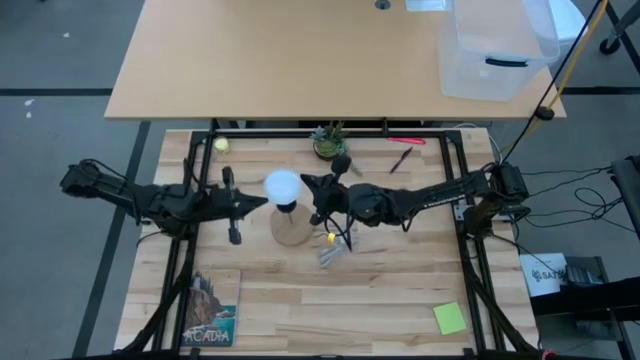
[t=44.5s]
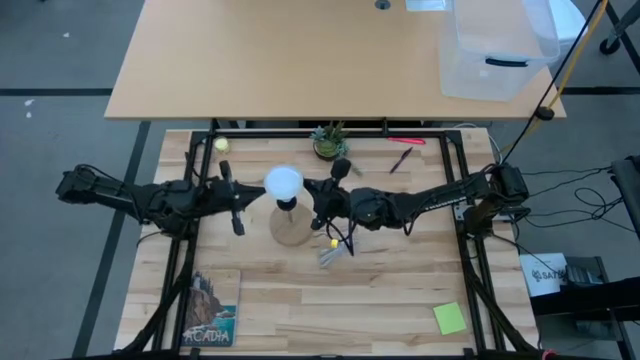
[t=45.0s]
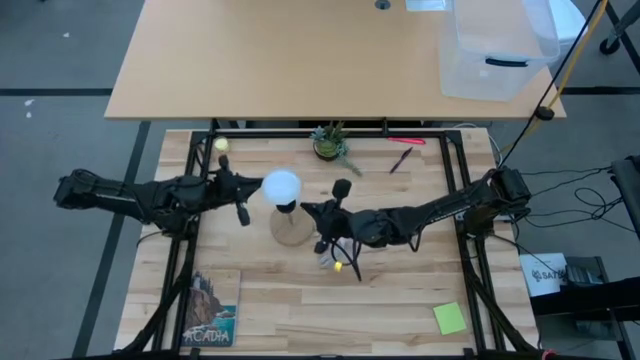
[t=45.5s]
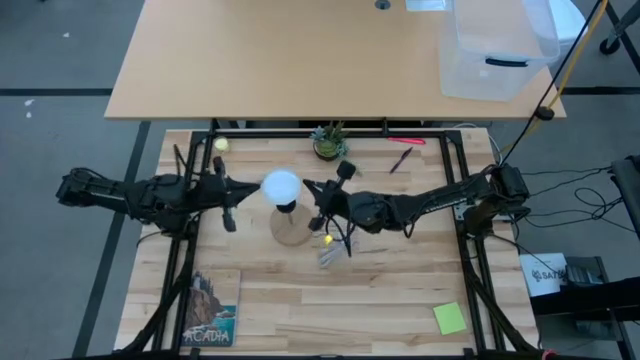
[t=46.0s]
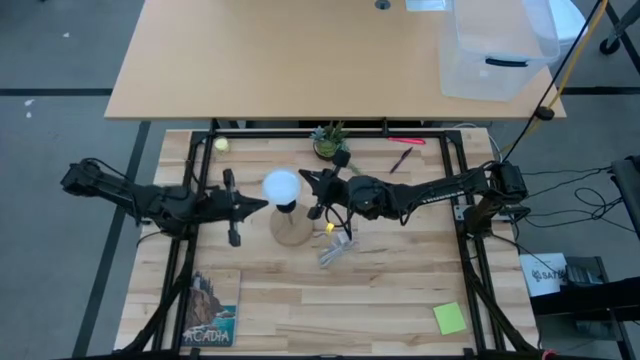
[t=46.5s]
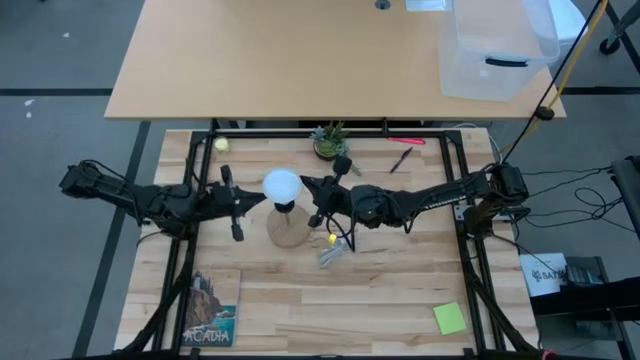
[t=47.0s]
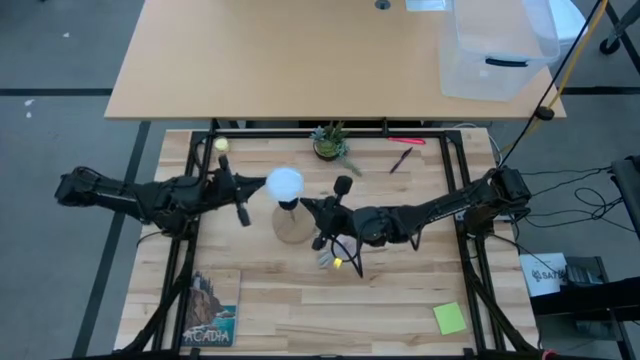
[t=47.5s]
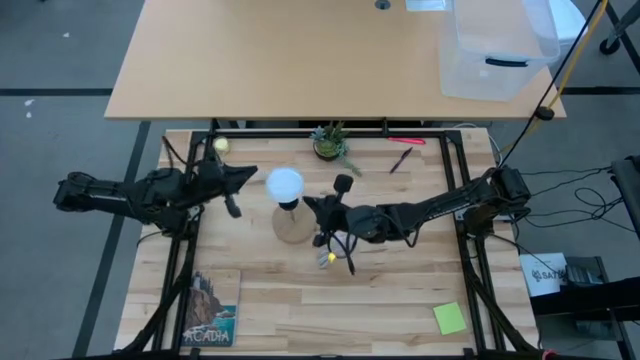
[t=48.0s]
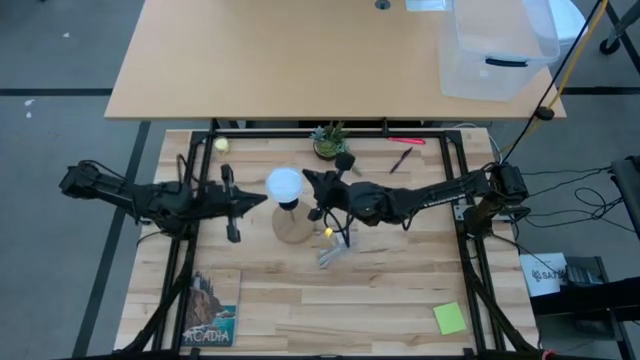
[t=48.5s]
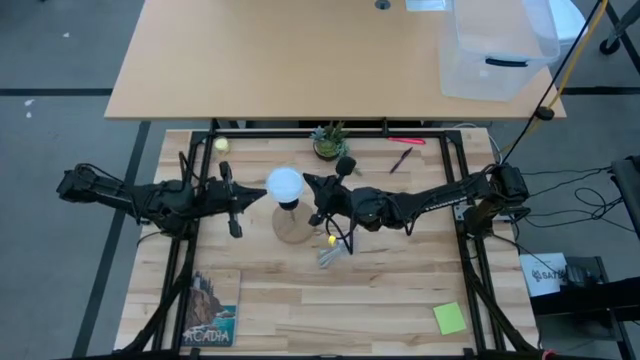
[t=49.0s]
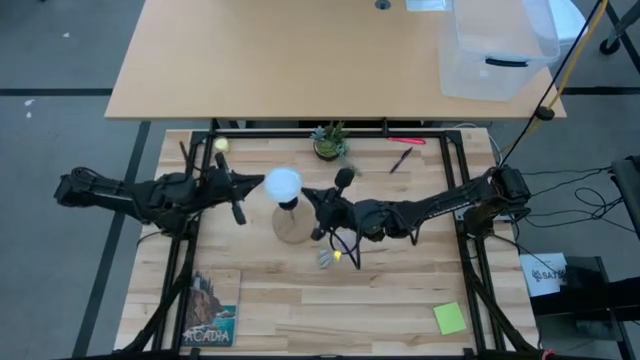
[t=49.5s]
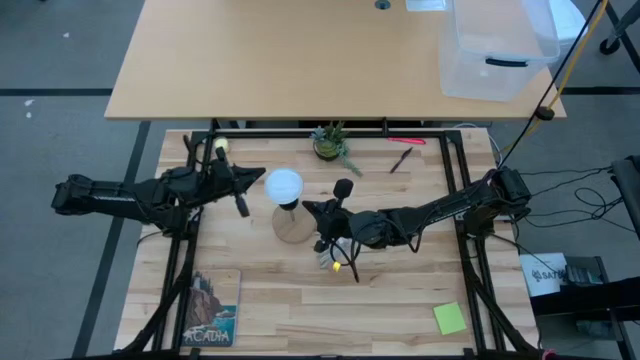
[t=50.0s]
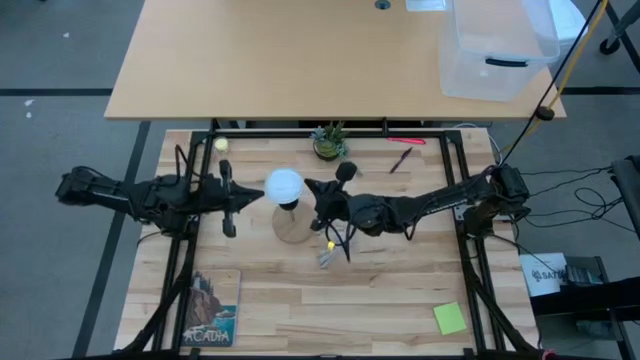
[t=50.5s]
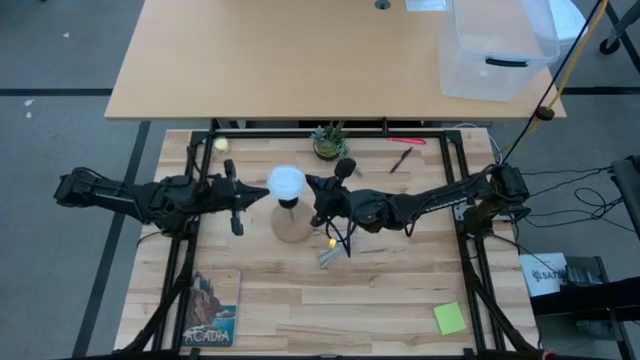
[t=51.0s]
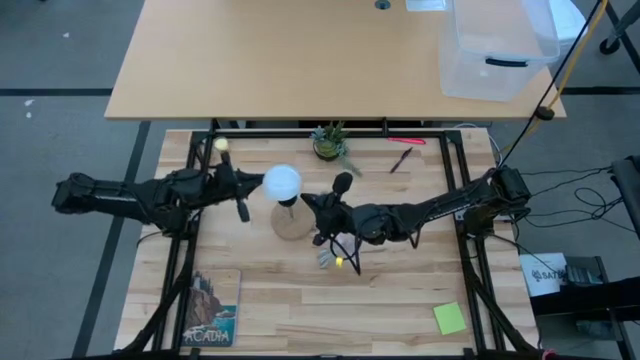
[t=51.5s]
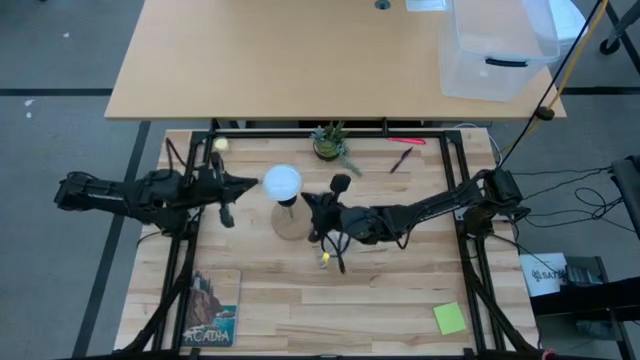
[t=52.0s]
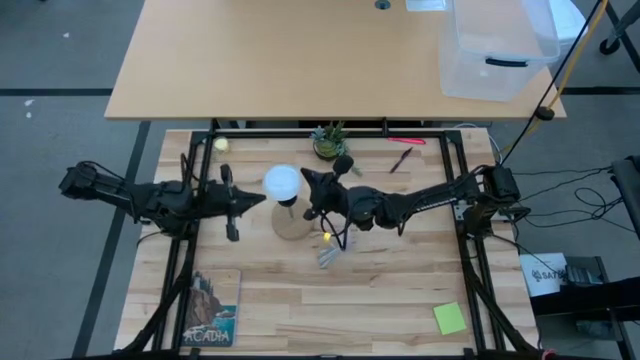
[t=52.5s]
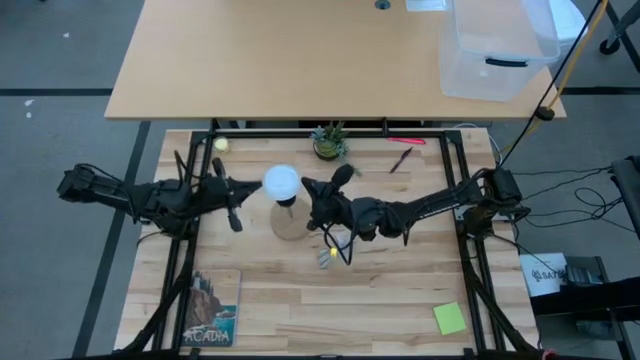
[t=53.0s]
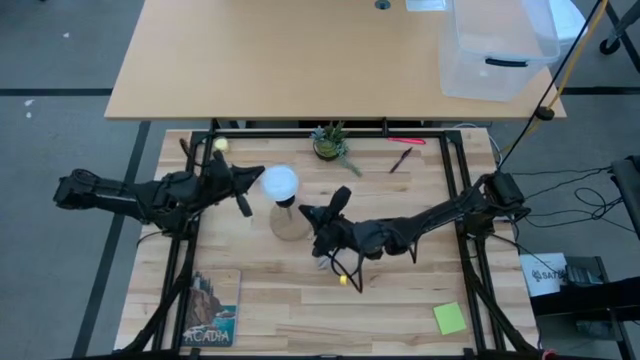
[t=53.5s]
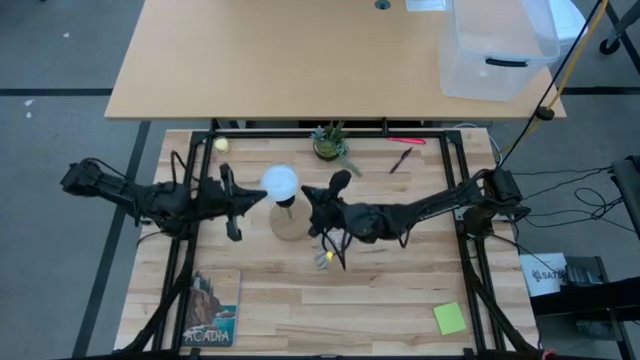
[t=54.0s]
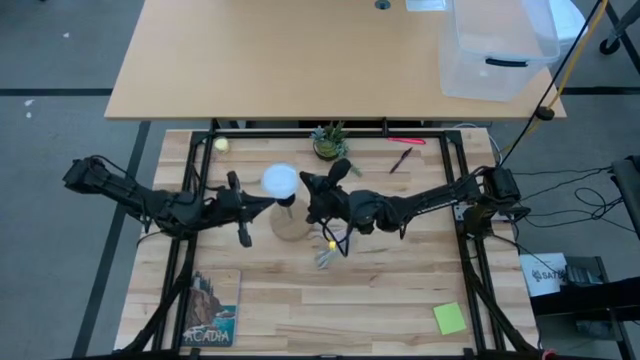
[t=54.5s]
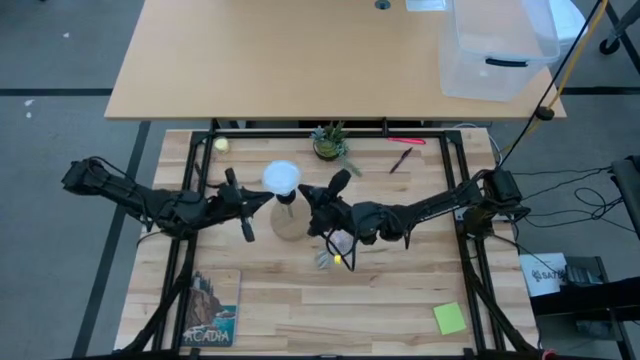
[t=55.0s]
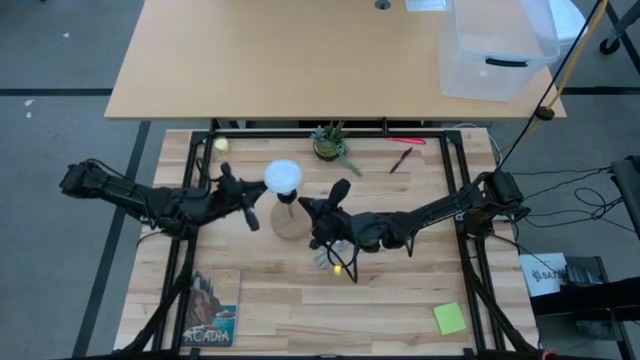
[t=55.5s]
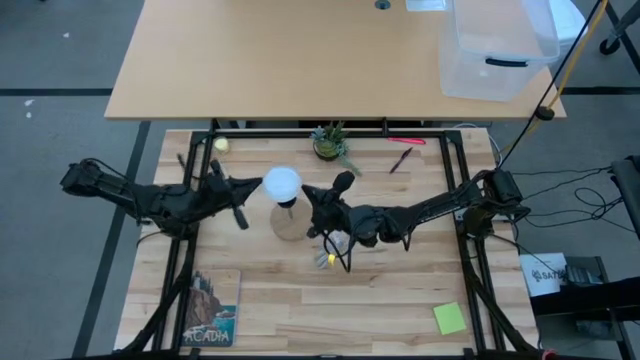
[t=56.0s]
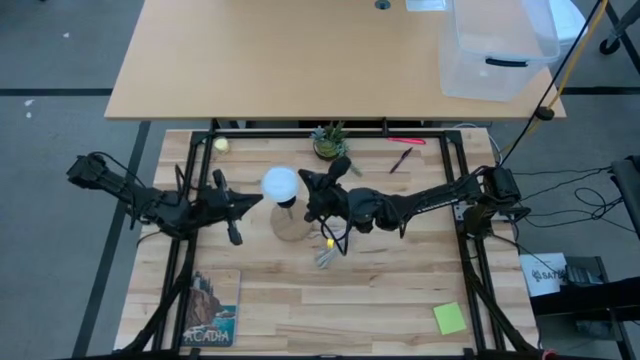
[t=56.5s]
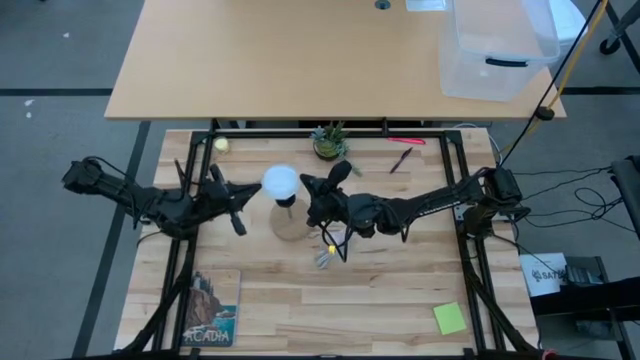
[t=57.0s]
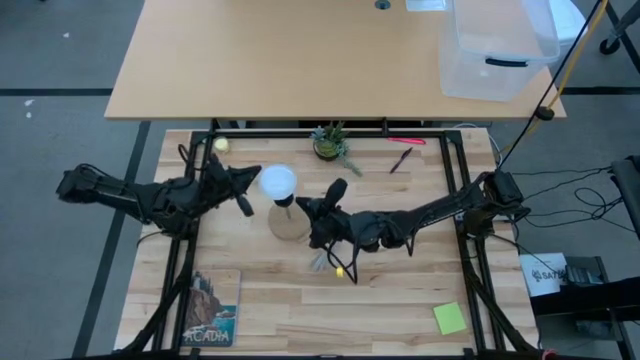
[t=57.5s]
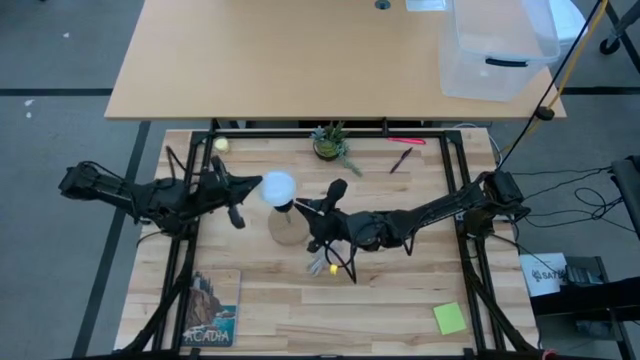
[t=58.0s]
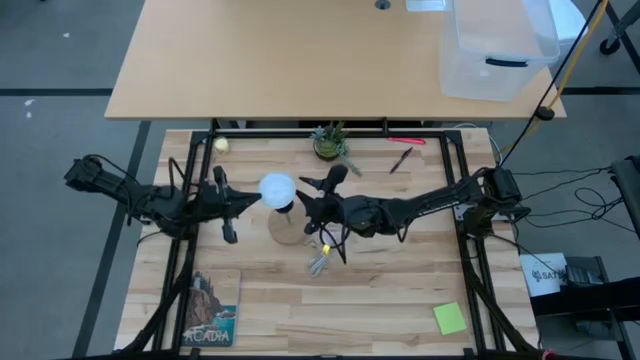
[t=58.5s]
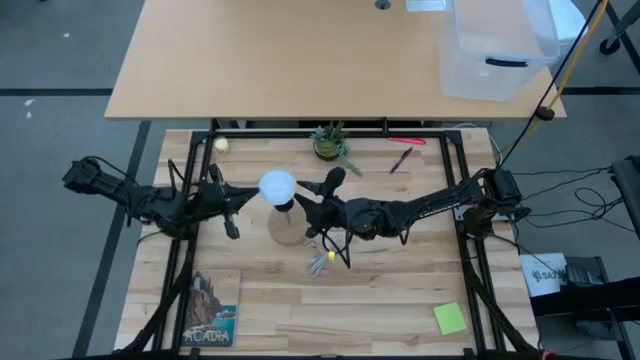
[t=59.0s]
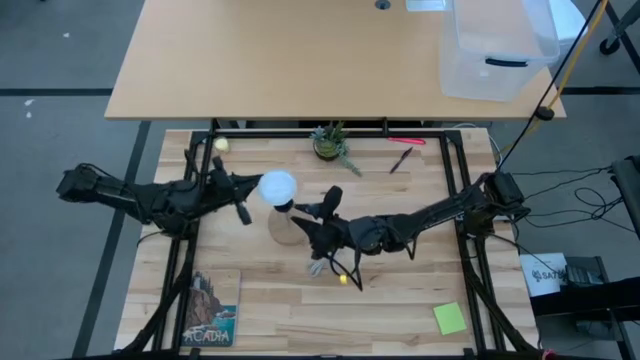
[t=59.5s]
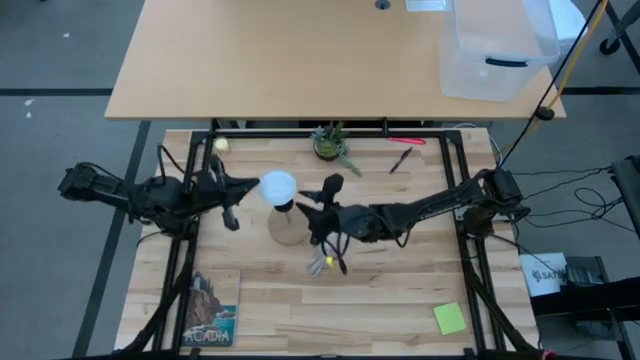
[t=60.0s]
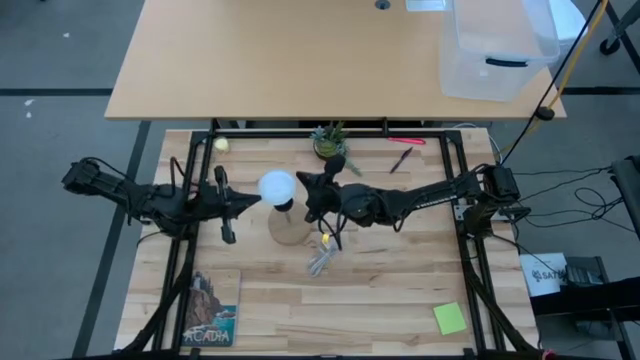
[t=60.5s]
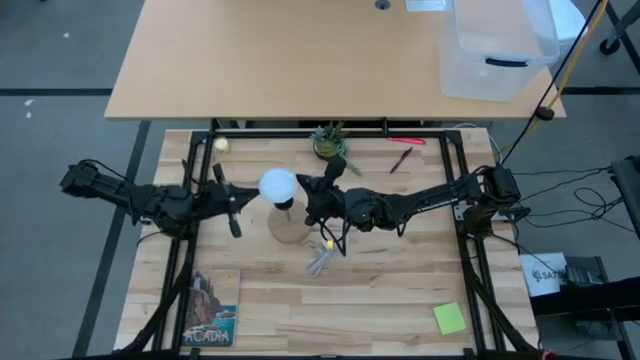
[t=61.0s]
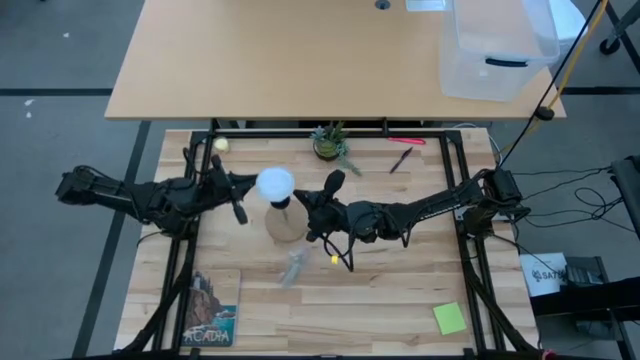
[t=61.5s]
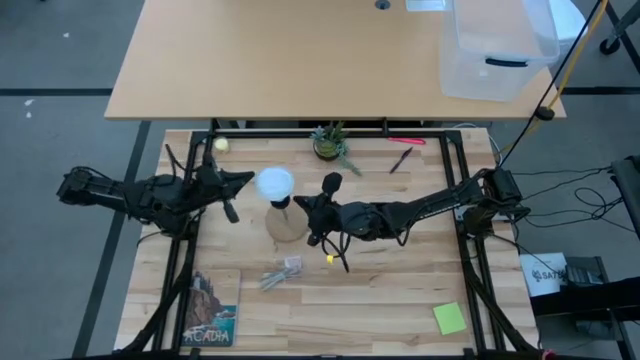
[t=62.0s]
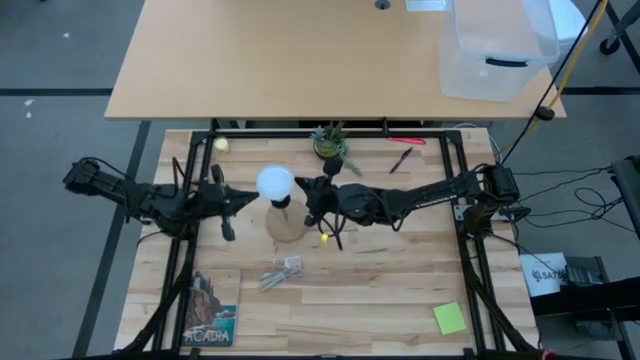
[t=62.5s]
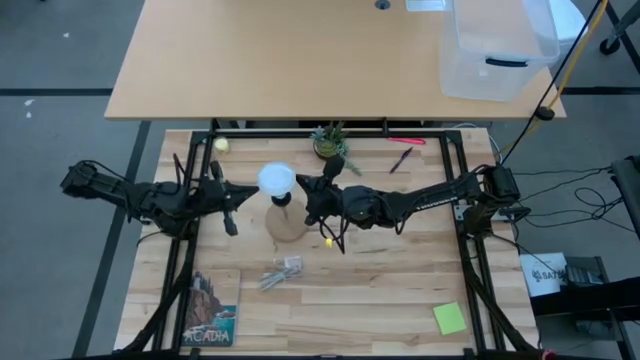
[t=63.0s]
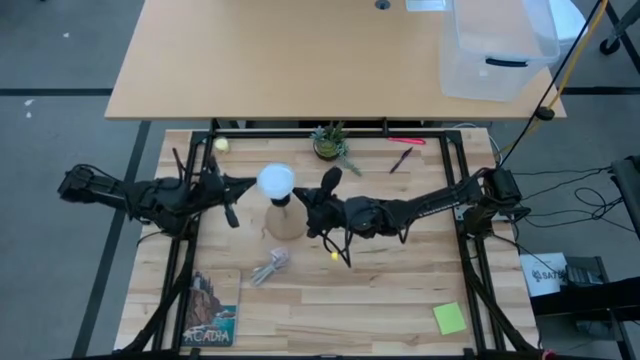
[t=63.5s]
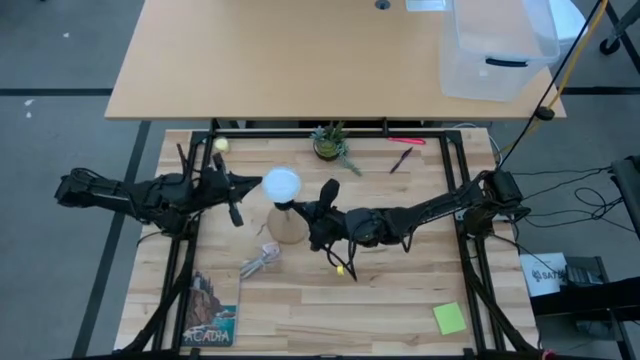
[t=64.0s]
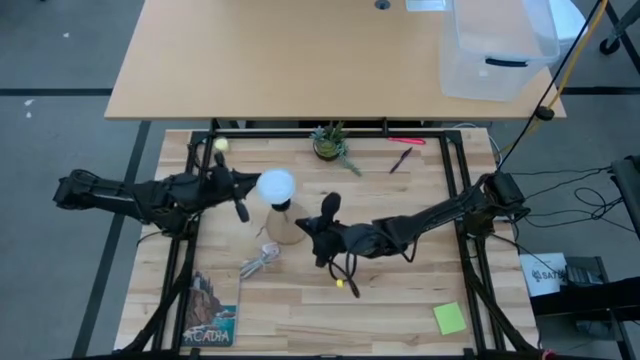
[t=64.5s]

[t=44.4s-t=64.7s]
Task: Screw lightbulb
Insert the lightbulb into the lamp
